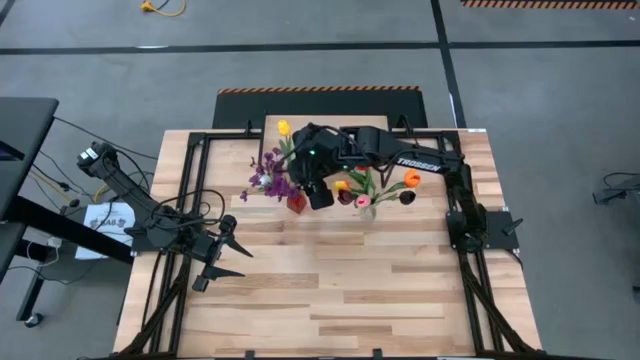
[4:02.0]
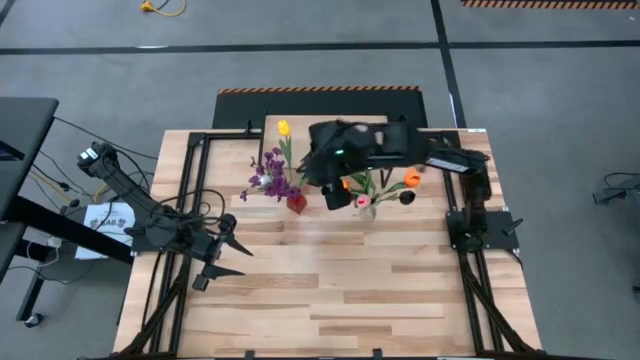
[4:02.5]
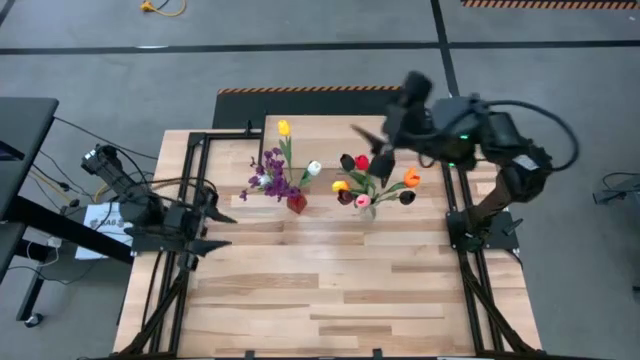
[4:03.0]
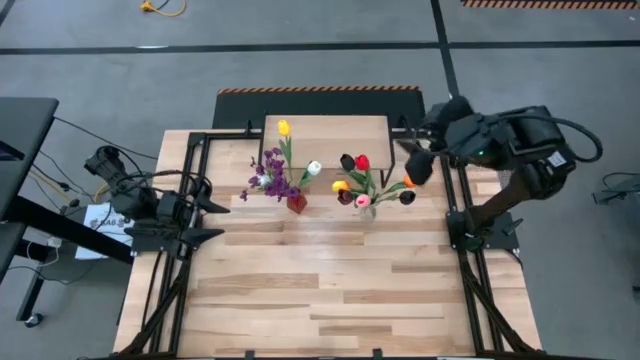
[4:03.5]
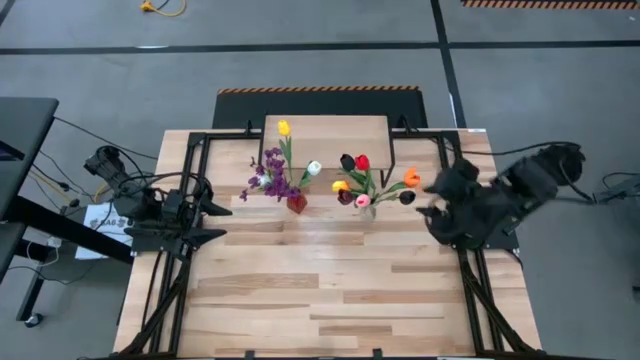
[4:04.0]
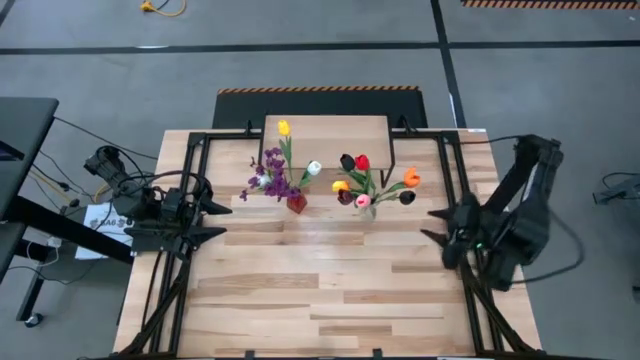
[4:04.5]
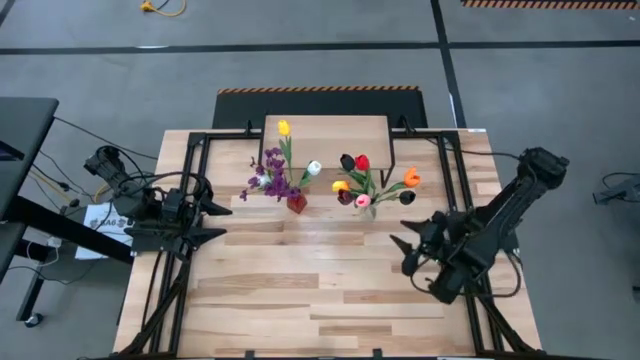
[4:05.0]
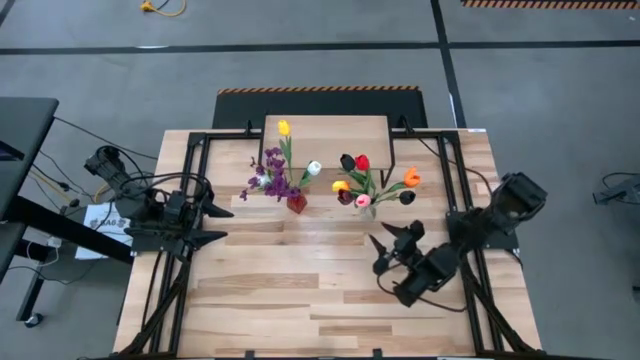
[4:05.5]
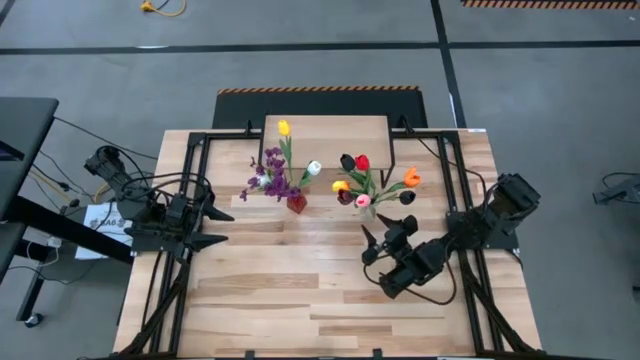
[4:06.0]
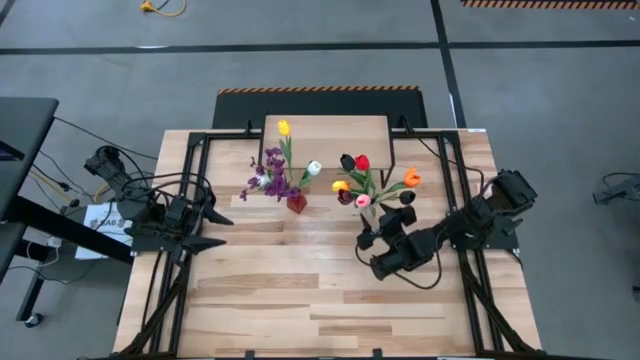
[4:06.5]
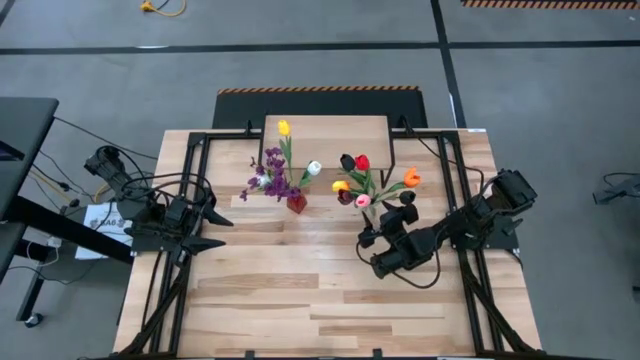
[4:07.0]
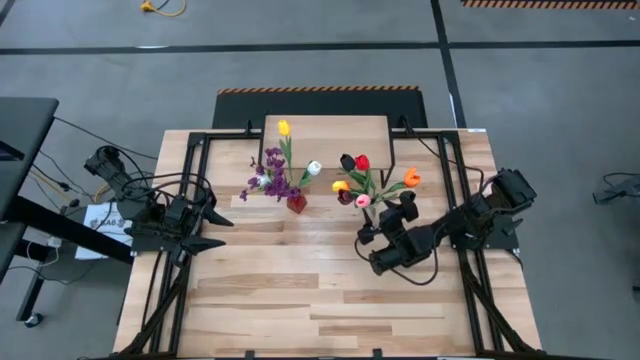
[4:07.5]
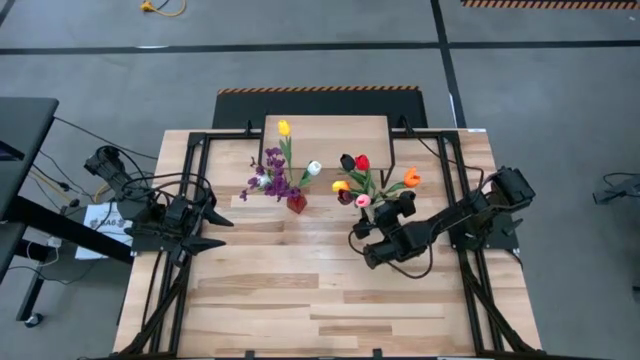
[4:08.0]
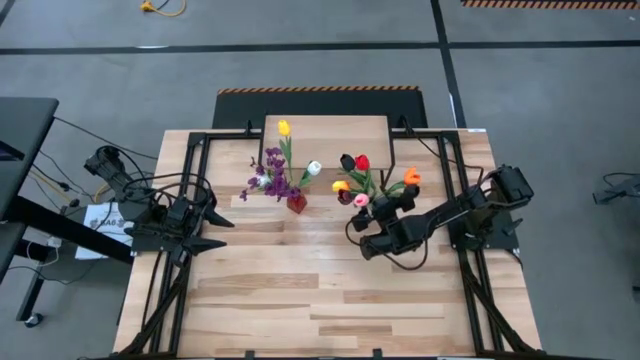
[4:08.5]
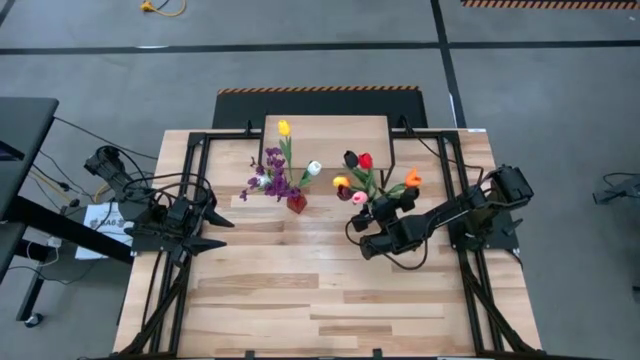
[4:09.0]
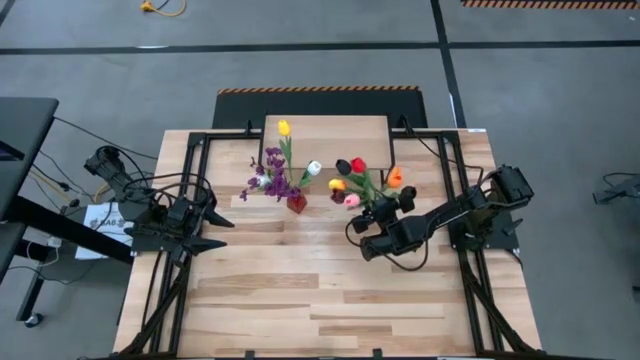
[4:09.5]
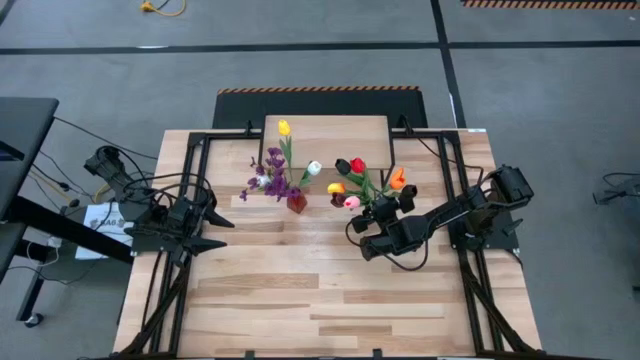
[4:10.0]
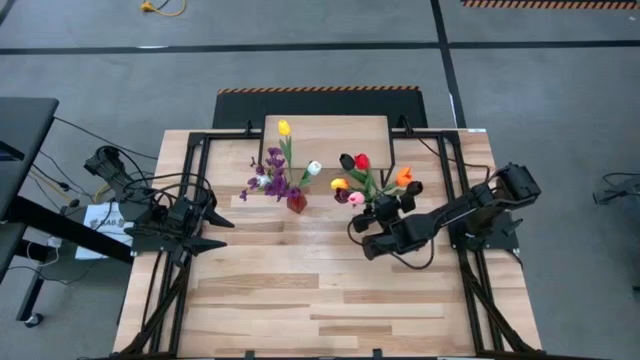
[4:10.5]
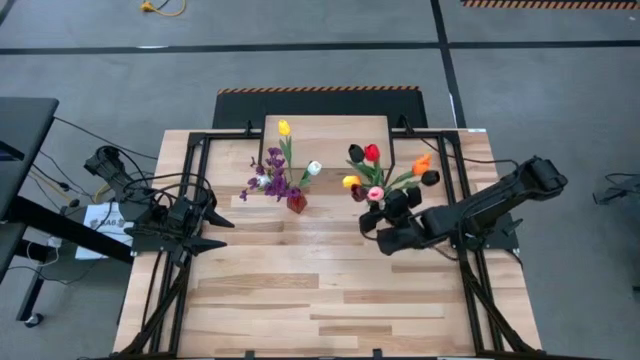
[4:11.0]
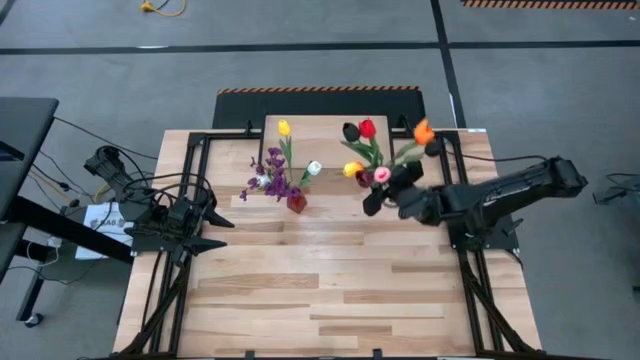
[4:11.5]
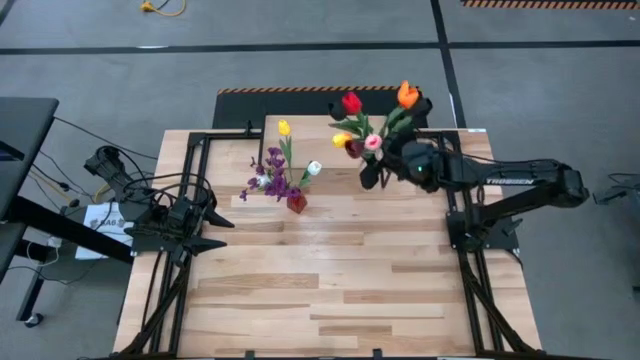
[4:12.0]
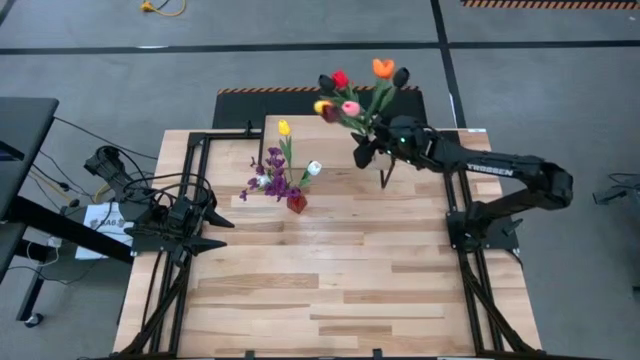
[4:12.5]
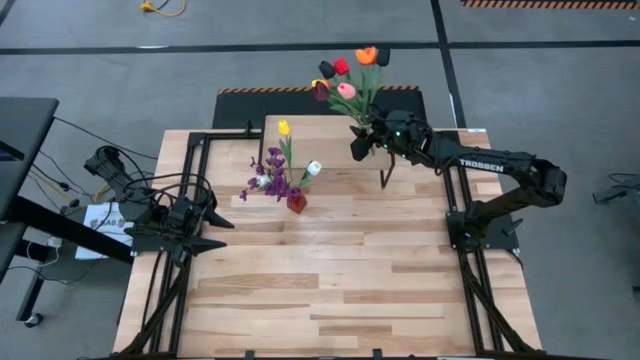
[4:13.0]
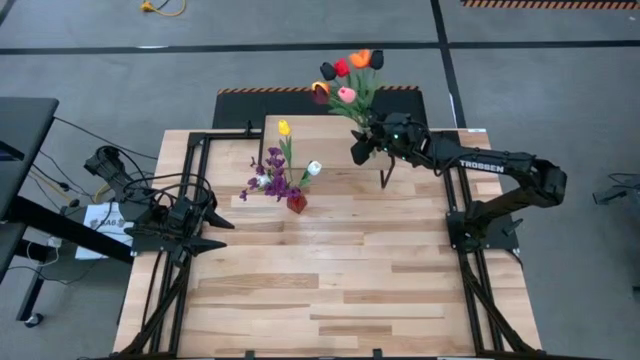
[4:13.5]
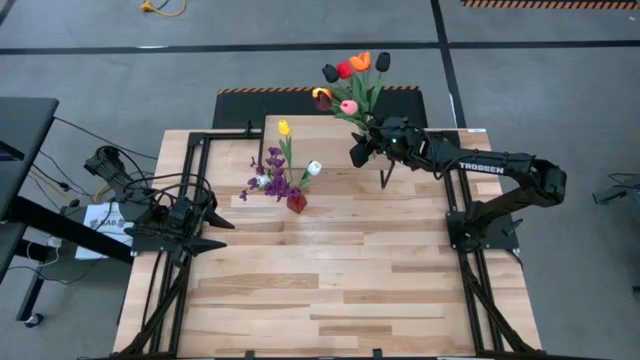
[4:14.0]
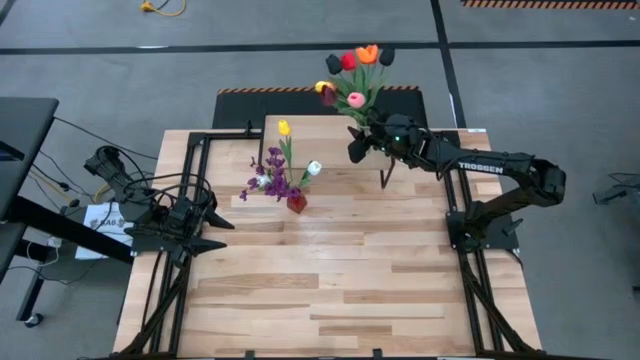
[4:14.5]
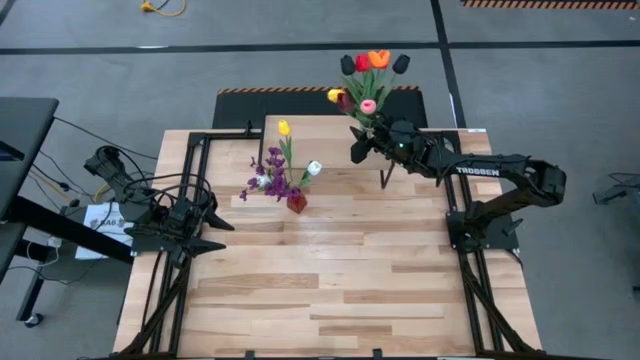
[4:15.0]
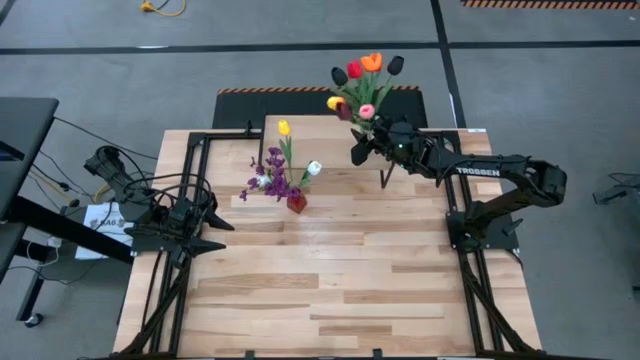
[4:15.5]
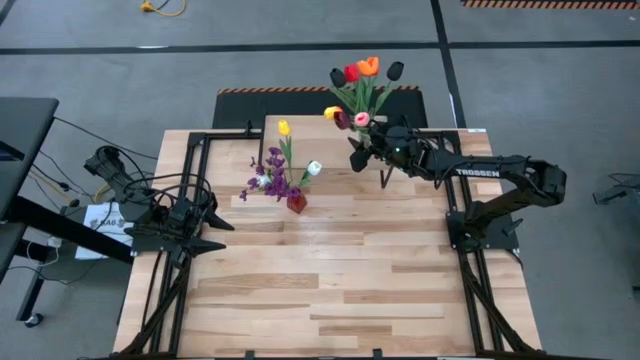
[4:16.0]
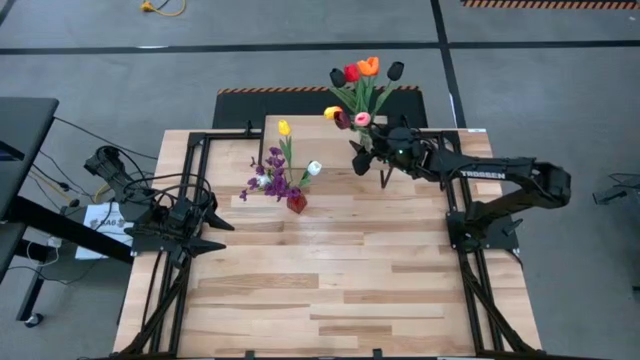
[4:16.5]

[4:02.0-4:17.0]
Task: Pick and place flowers into a vace then onto a shelf
Put the transparent vase with flowers on the shelf

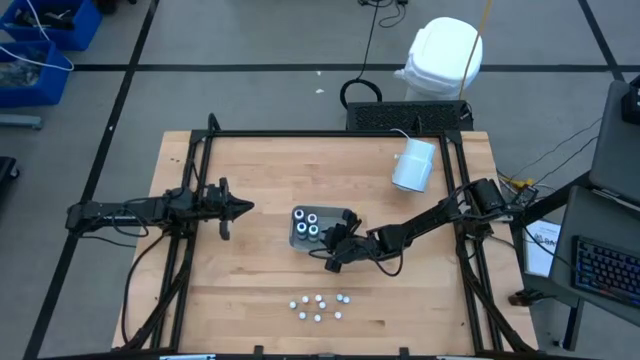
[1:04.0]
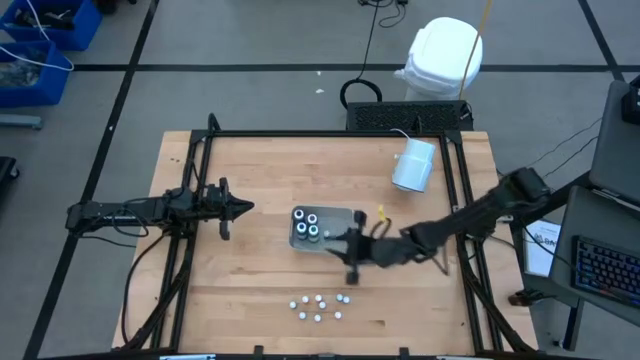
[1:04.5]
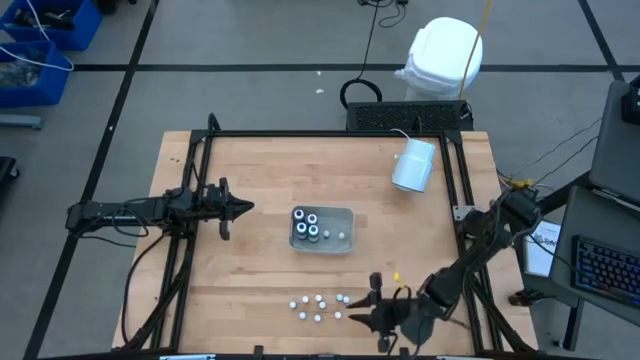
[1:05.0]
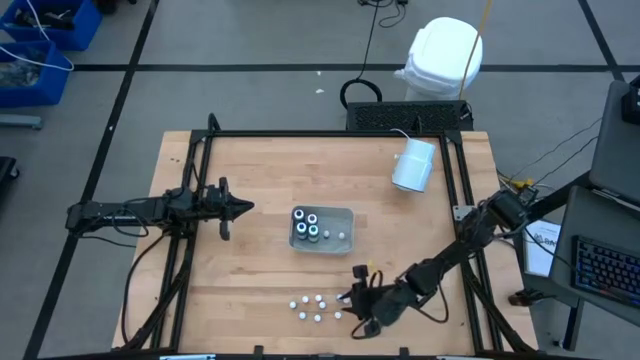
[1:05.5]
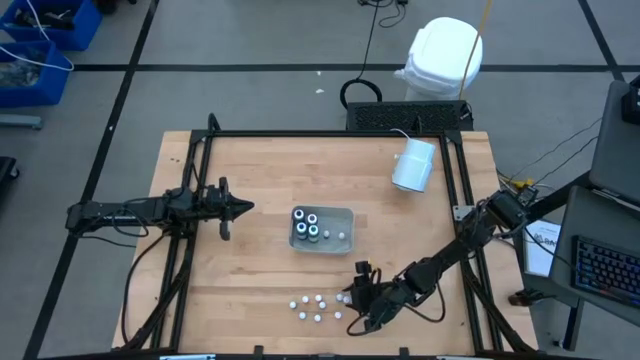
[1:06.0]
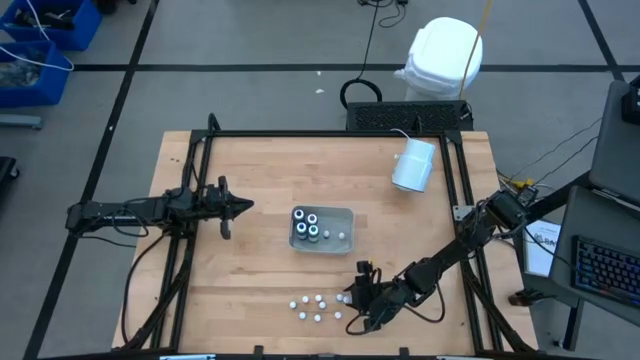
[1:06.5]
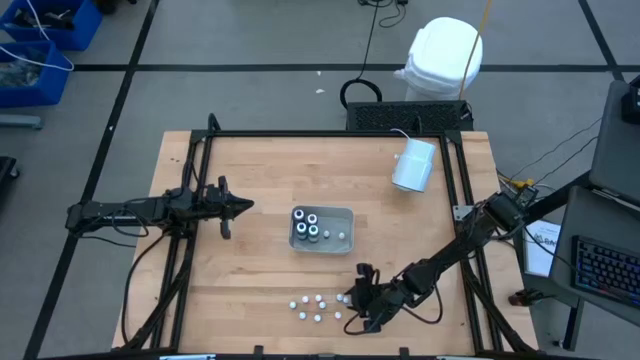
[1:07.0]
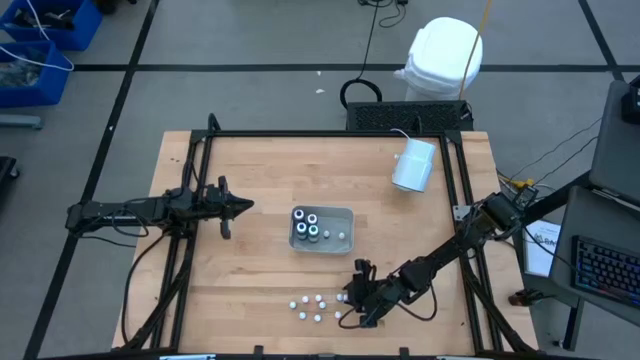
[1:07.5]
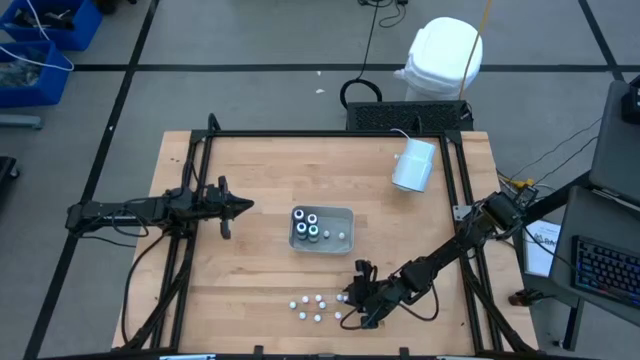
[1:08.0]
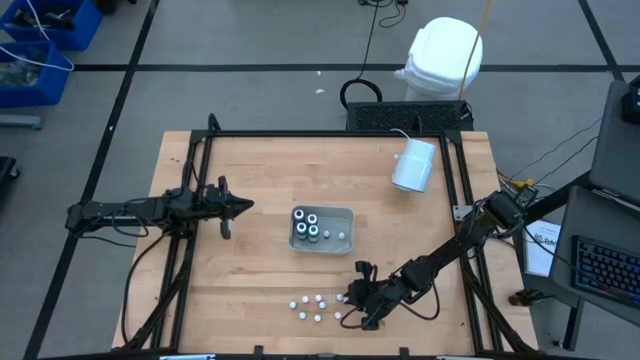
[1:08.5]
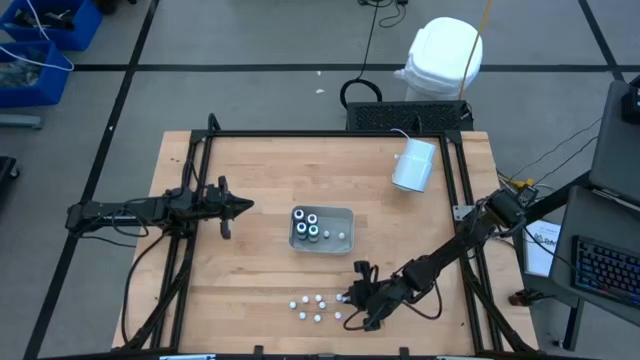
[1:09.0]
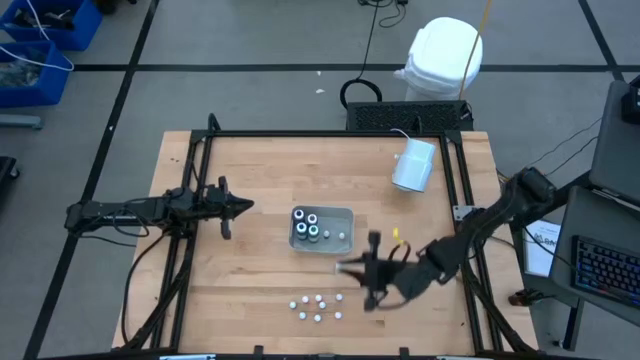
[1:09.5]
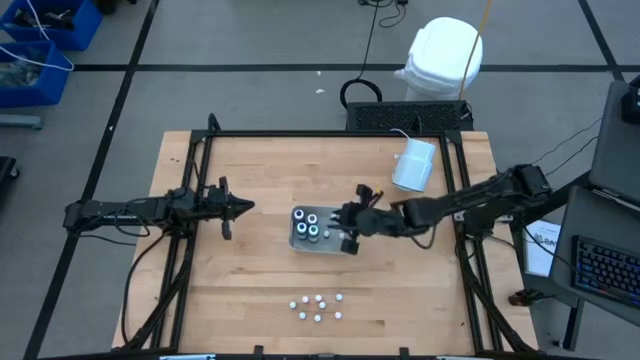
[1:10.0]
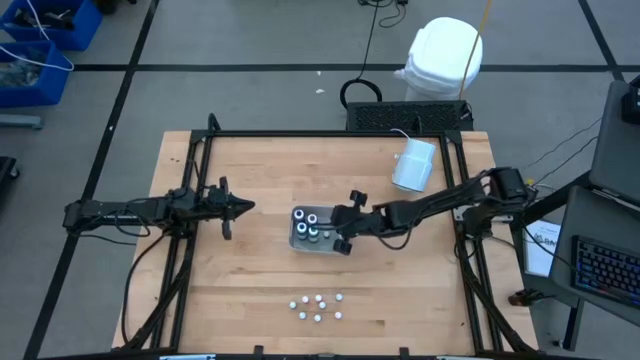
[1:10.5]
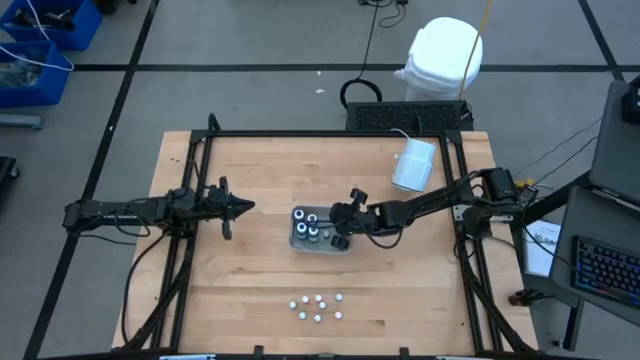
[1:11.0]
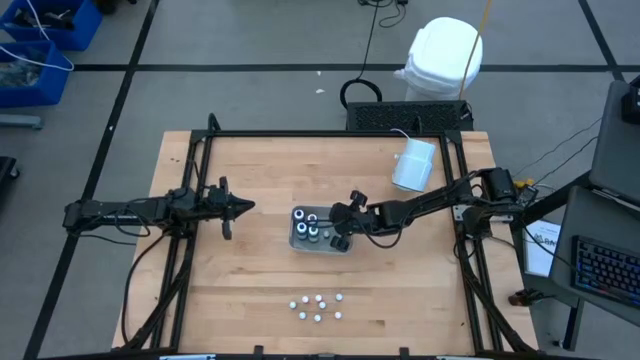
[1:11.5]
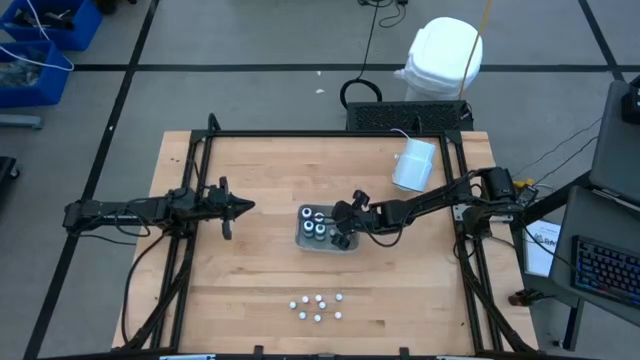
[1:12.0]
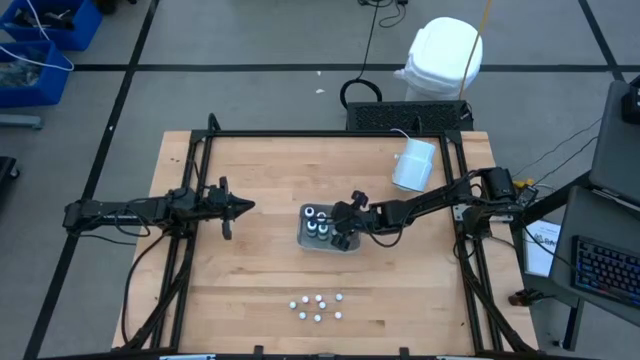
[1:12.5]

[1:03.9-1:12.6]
Task: Pick & Place food coloring
Put the small purple bottle into the gray bin
